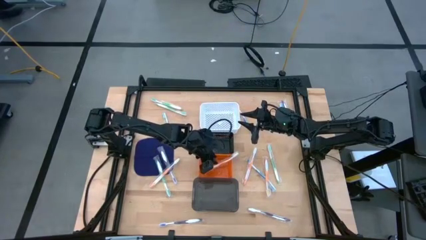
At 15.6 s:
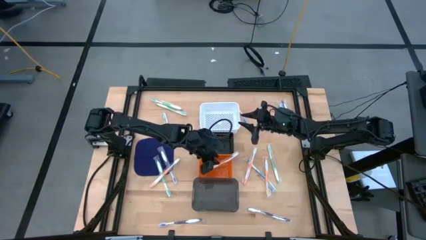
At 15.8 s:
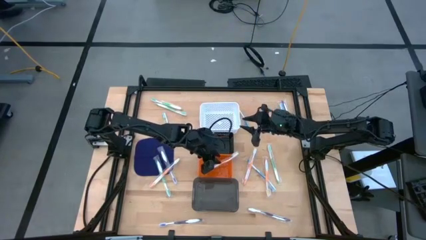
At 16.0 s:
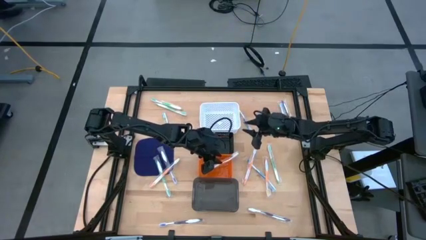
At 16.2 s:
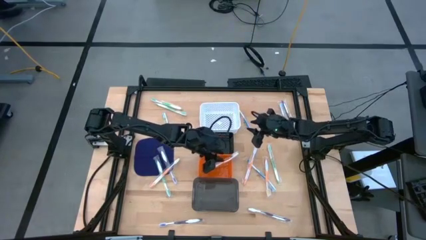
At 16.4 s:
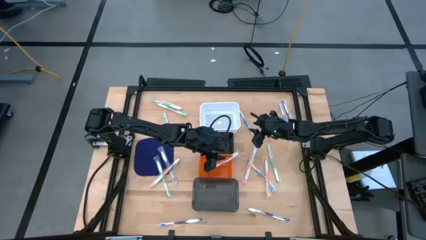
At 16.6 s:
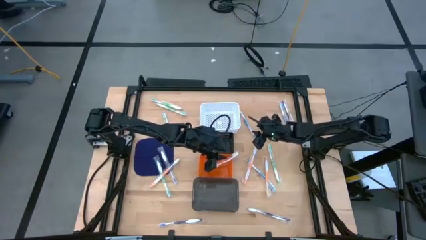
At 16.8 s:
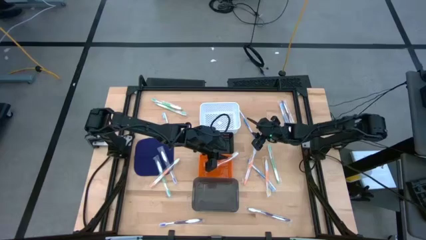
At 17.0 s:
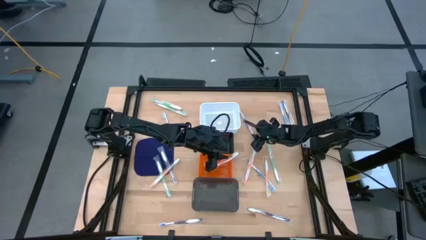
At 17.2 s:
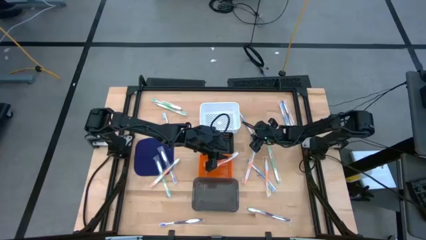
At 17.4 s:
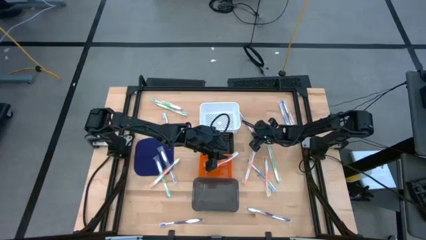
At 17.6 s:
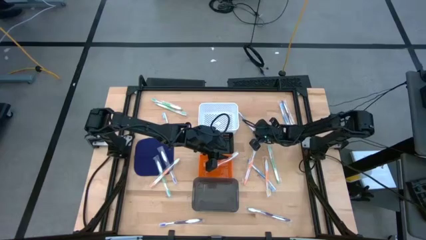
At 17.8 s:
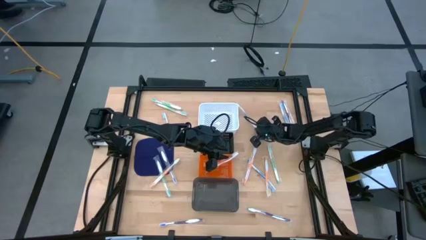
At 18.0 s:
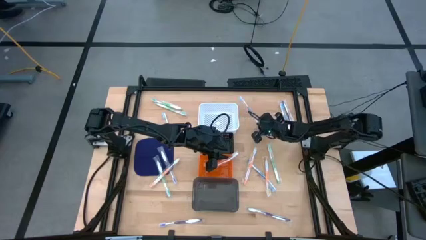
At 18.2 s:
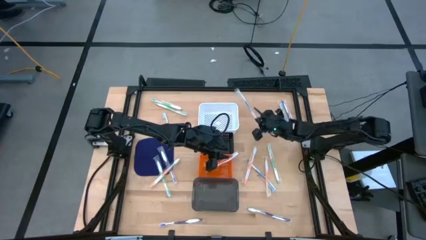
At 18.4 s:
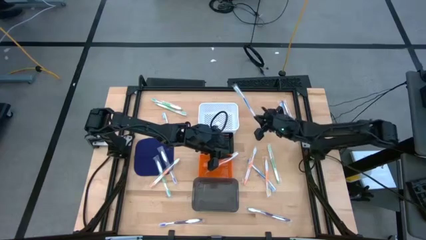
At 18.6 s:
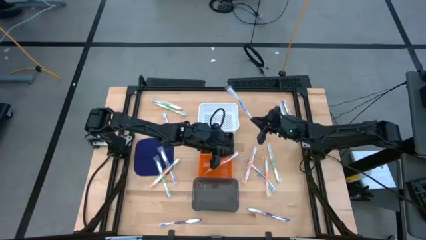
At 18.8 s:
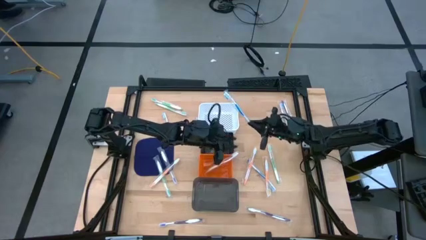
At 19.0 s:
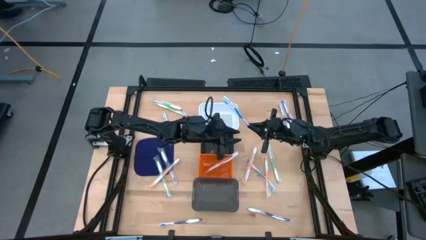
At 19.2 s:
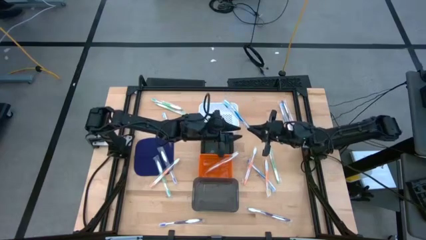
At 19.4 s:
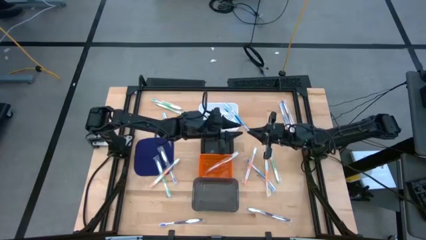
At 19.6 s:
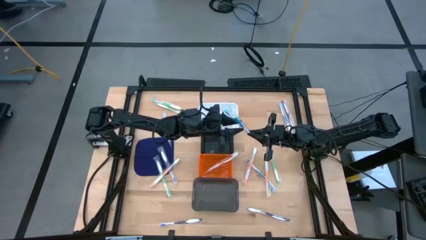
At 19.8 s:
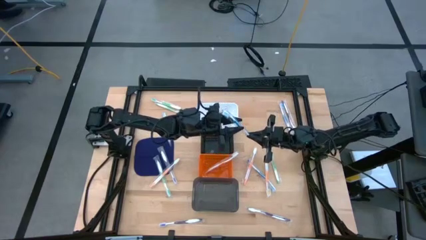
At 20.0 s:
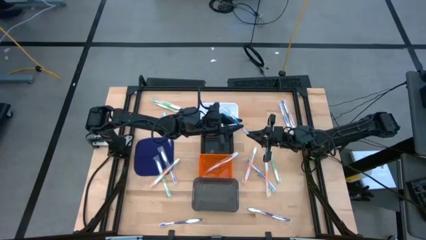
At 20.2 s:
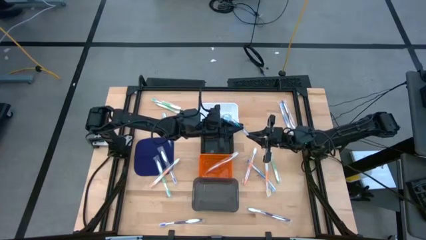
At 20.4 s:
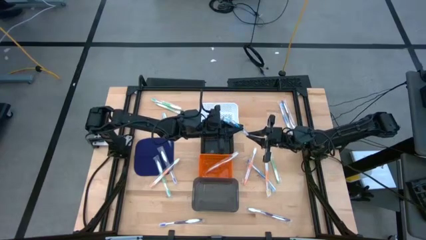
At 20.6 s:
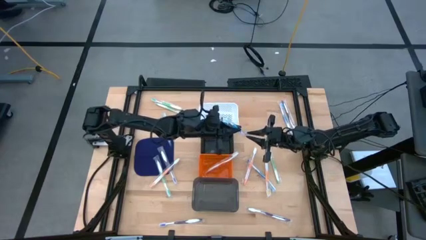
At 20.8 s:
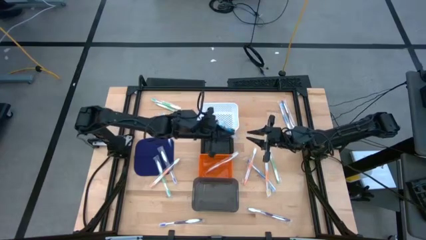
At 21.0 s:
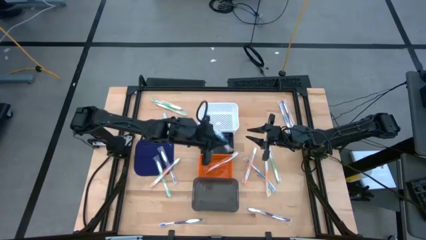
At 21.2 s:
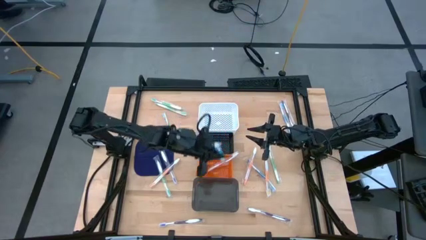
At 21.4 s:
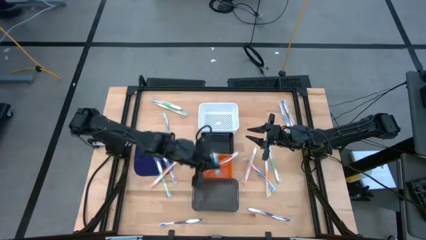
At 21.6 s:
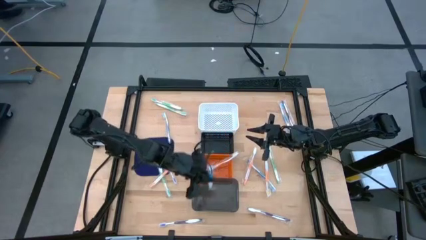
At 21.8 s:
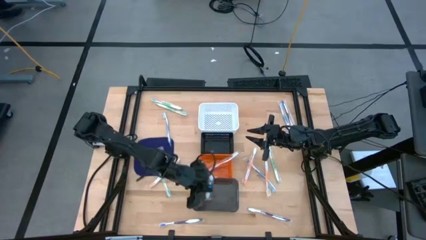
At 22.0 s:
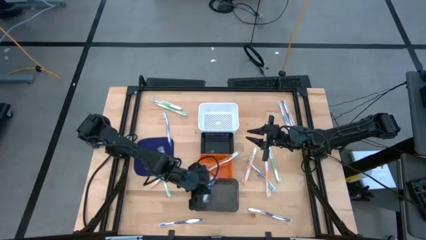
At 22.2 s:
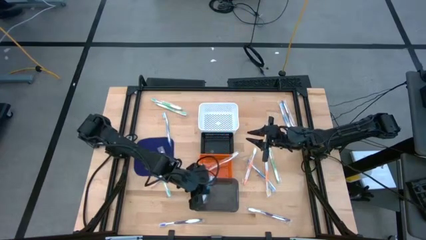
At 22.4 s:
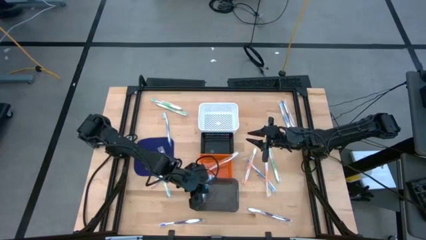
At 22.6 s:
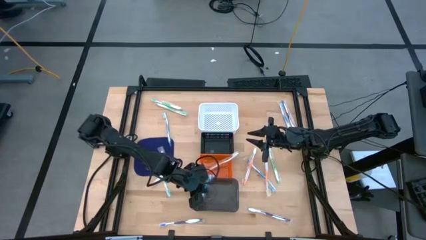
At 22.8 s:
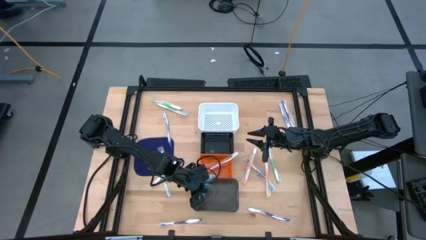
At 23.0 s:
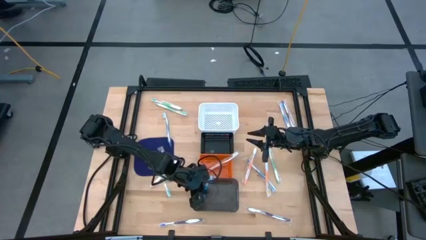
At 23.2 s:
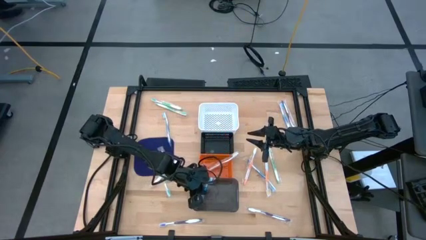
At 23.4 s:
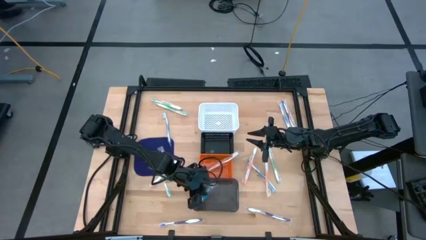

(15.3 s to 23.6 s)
Task: Pick & Place Toothbrushes
Put the top middle blue toothbrush into the black bin

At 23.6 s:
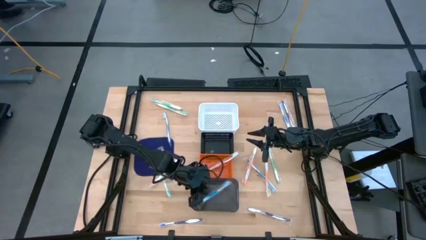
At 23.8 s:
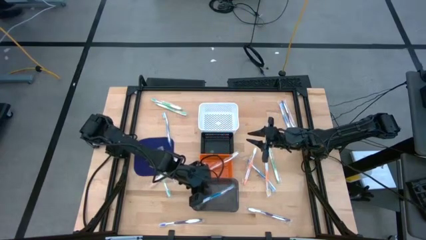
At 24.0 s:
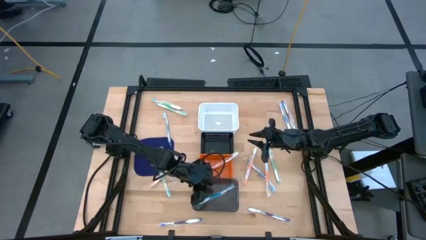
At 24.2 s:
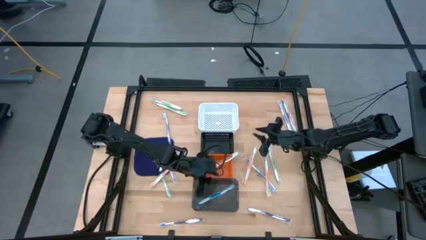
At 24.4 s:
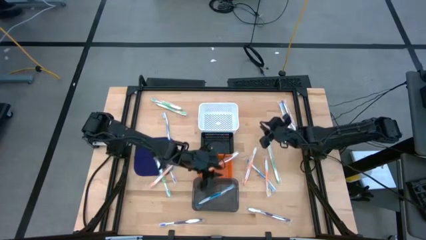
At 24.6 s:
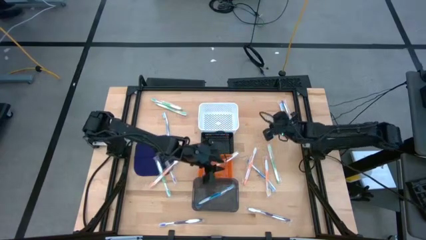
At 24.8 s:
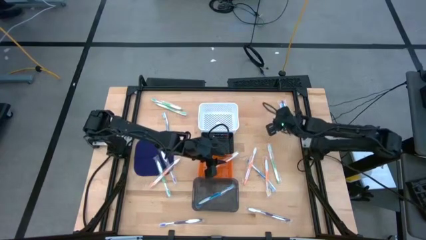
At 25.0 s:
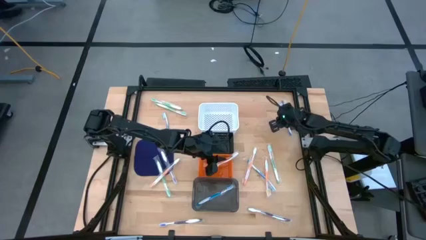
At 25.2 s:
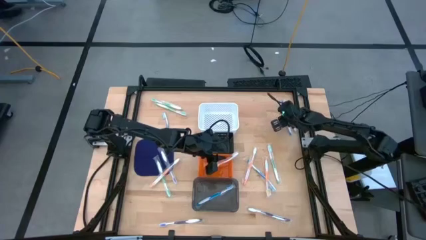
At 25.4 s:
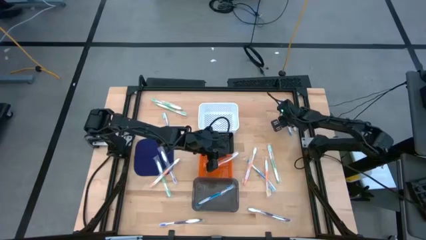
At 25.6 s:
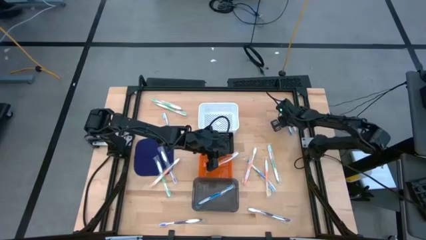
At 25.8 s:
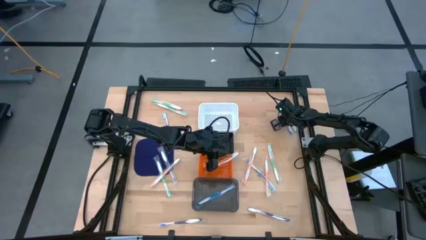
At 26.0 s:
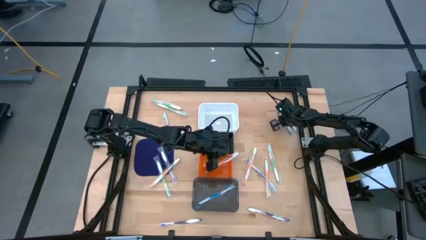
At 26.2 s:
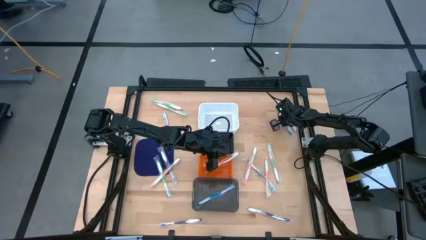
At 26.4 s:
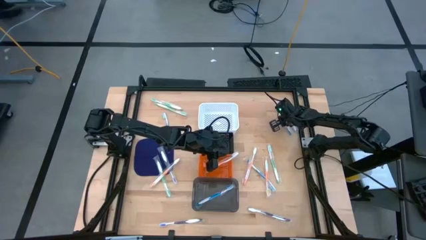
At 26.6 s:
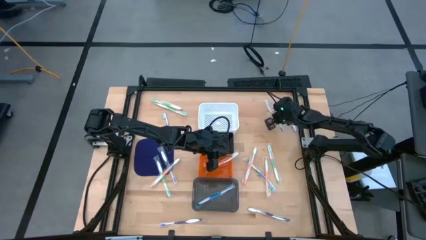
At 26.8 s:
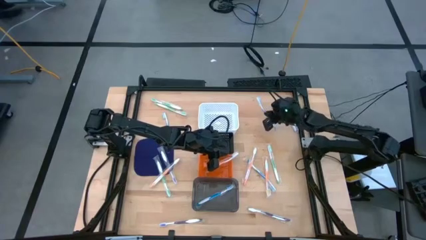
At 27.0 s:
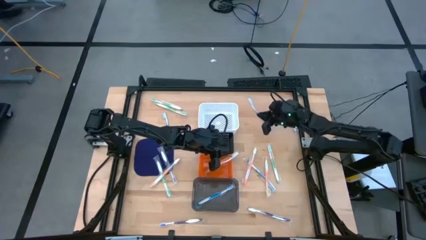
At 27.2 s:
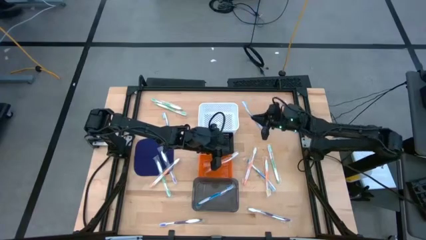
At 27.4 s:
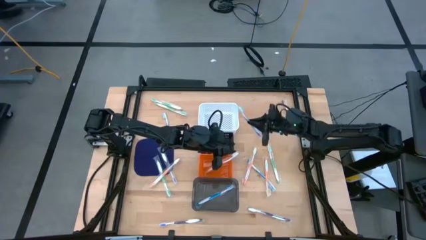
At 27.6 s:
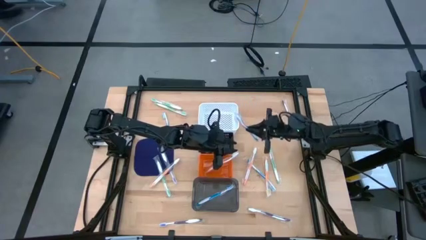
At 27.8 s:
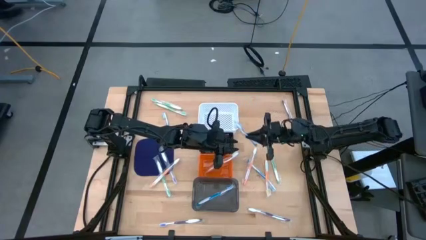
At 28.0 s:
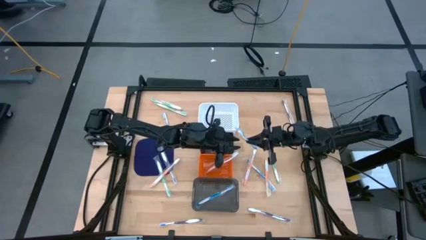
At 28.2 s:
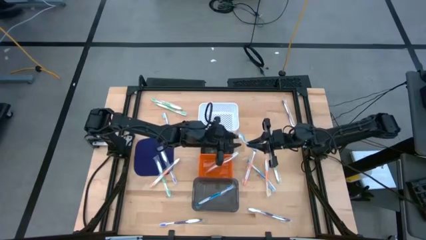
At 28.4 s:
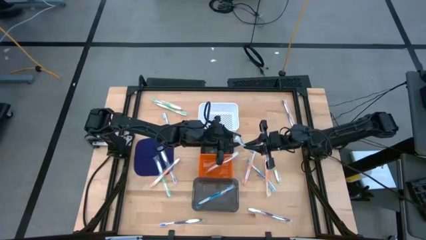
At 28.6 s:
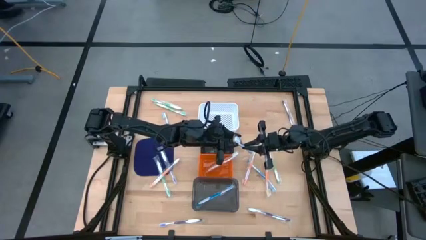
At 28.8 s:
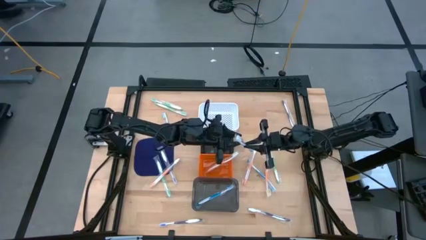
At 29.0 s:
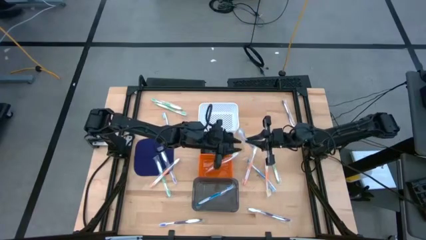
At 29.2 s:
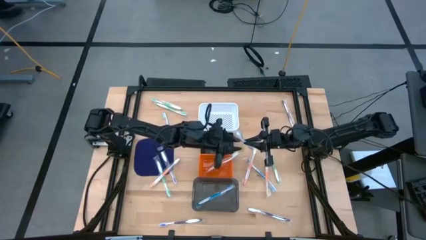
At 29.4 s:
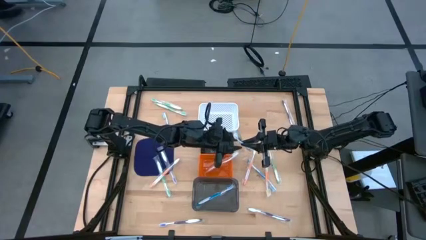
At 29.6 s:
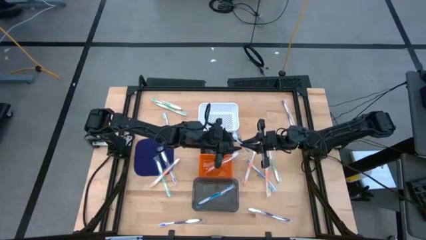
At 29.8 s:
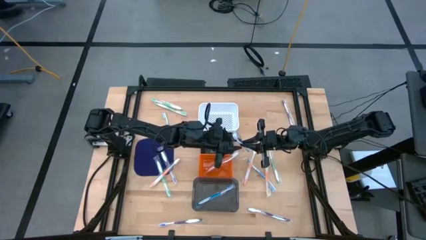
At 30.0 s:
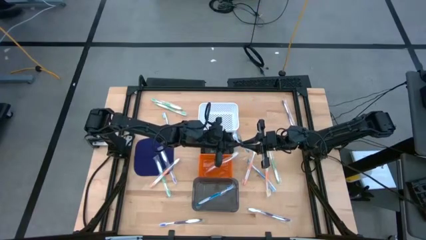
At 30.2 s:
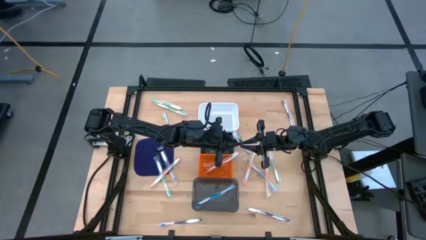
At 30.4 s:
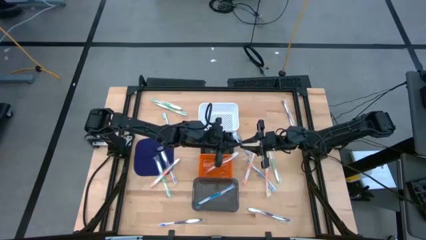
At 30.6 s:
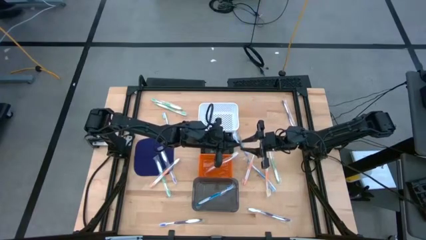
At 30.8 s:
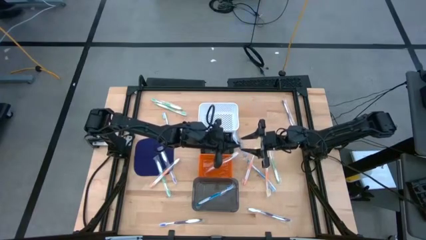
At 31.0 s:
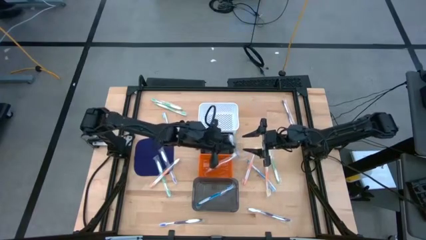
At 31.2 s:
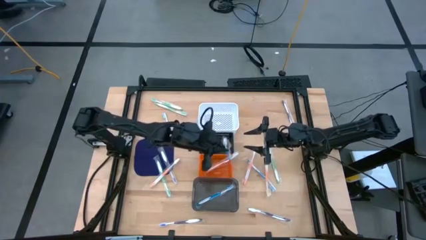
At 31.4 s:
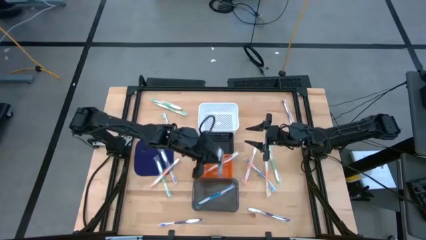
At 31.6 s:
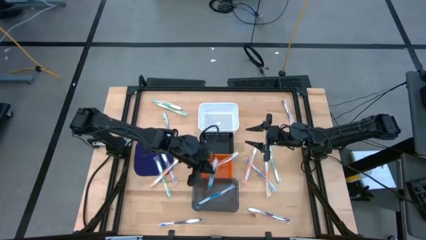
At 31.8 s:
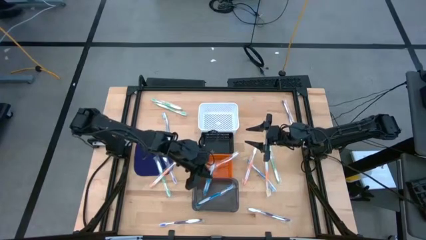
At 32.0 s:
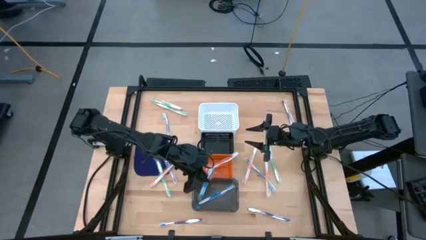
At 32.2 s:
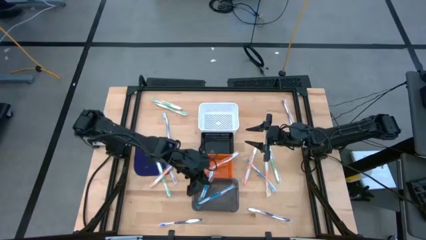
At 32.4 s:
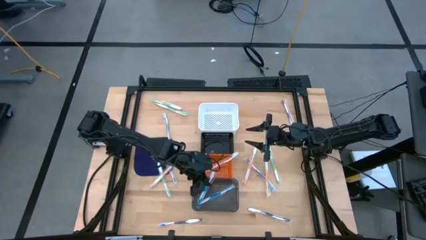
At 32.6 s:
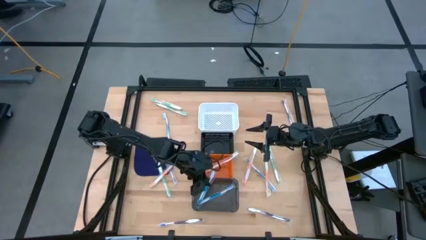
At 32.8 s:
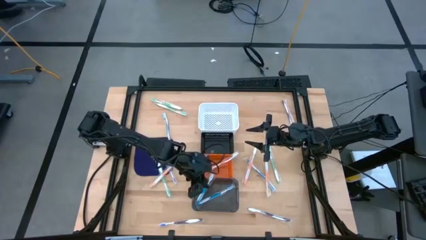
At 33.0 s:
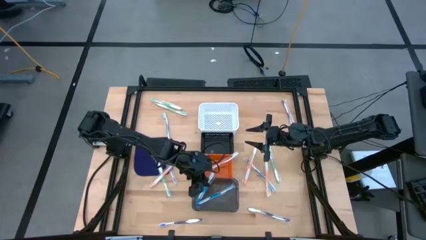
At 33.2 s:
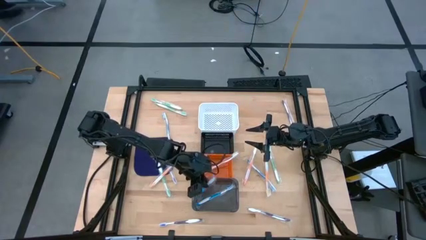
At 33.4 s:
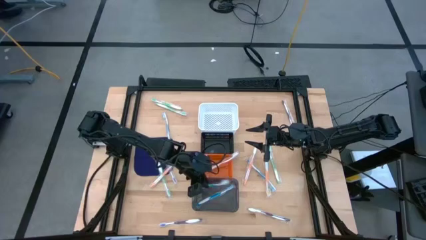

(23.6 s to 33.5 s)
Put the top right blue toothbrush into the black bin
